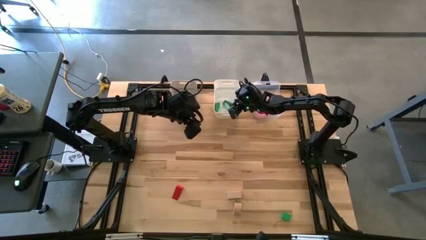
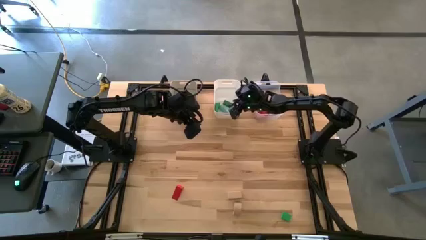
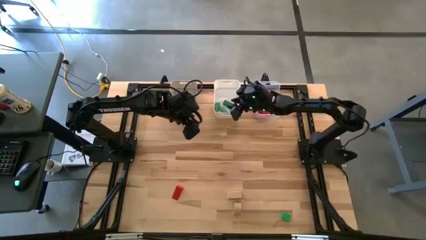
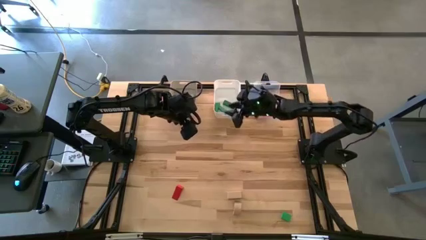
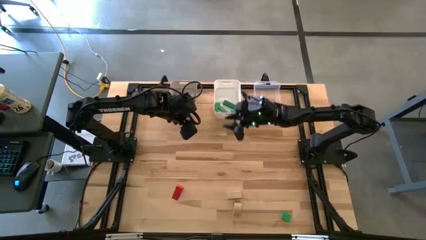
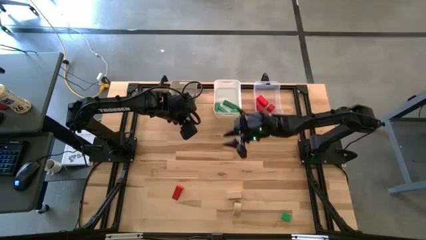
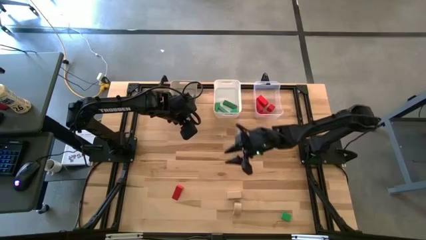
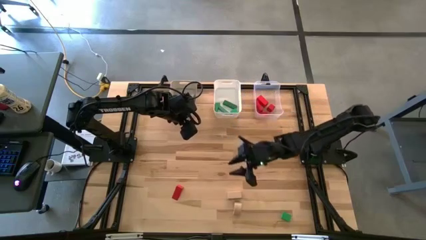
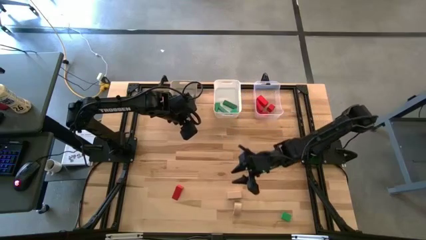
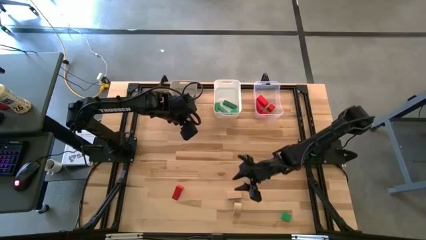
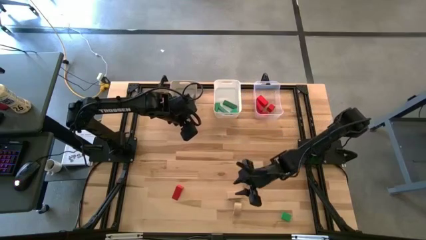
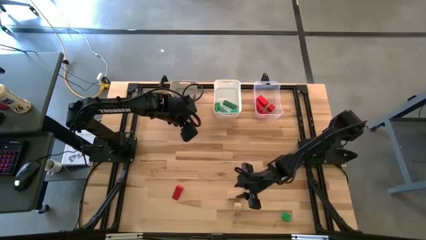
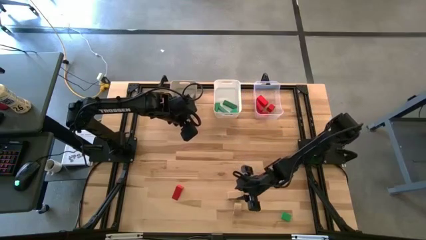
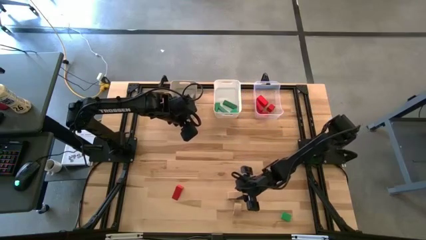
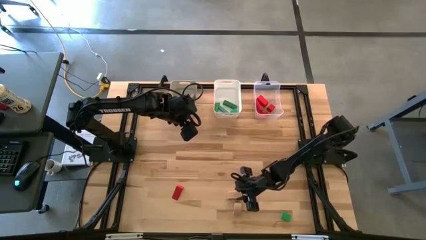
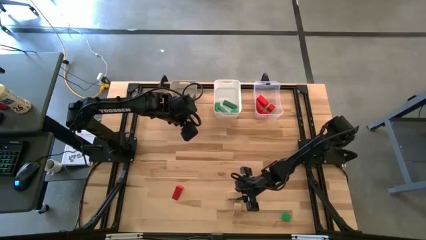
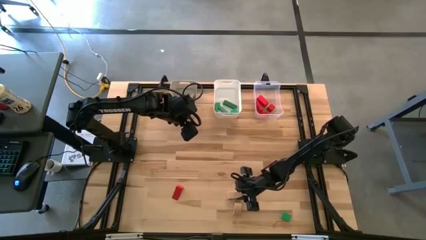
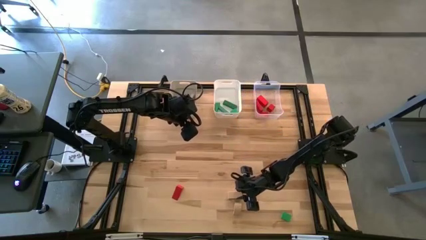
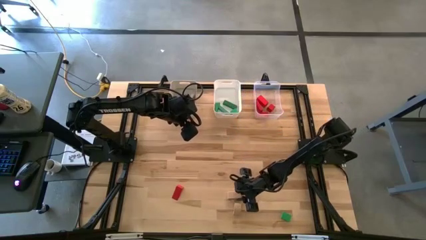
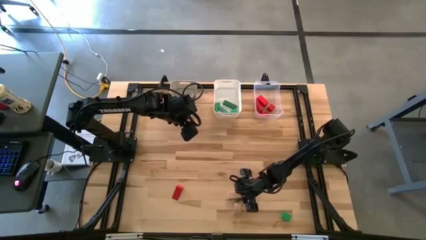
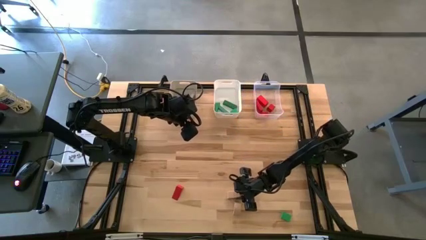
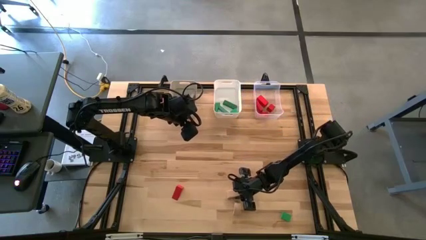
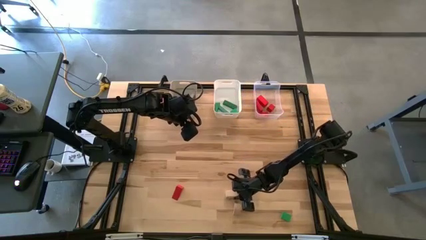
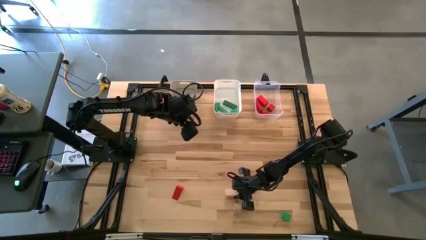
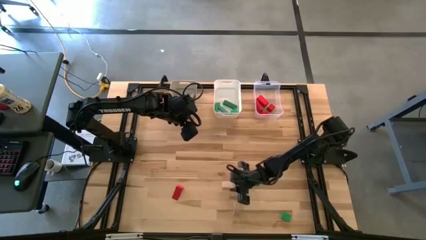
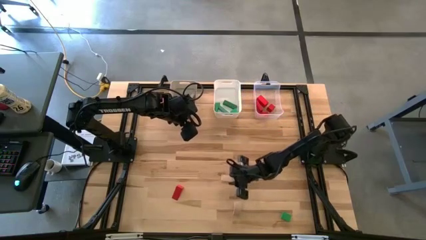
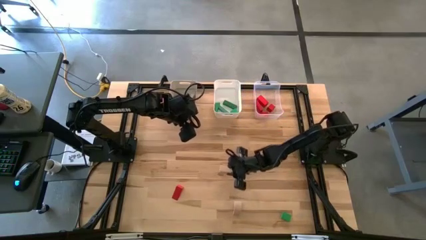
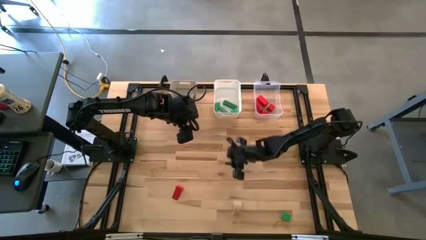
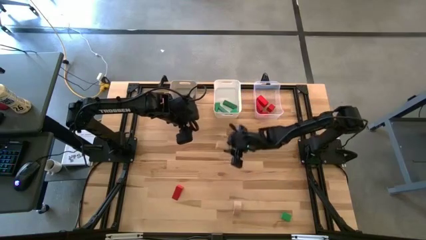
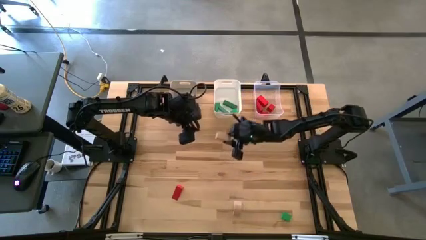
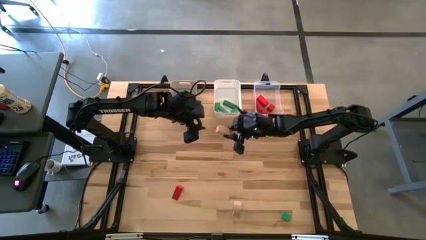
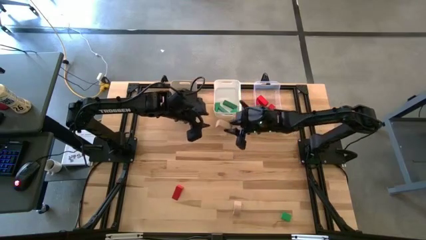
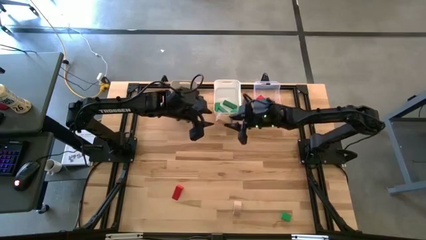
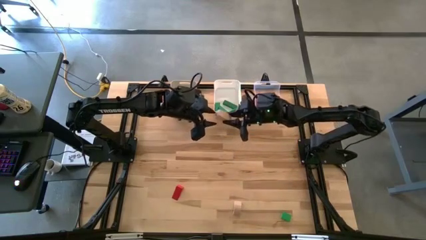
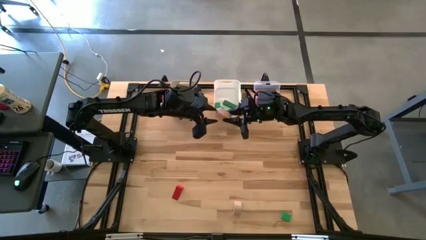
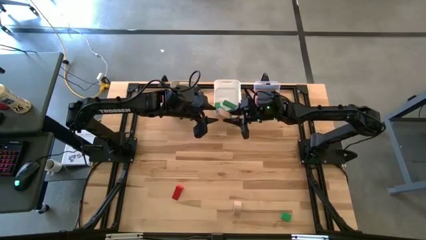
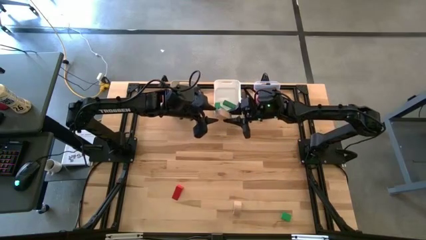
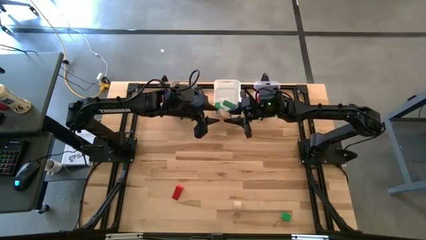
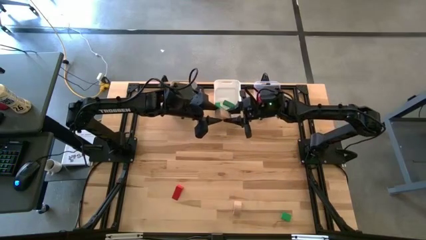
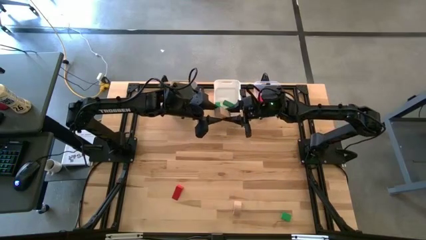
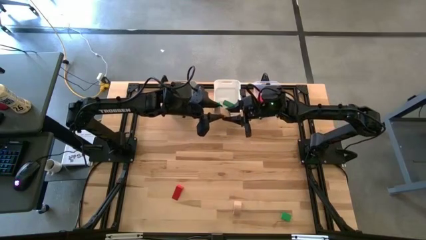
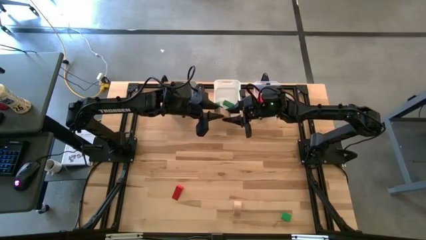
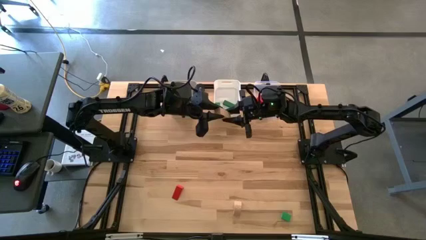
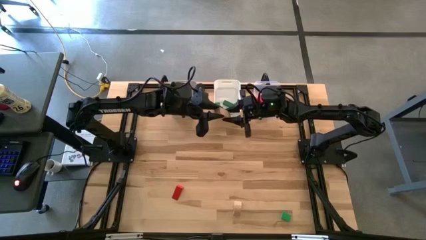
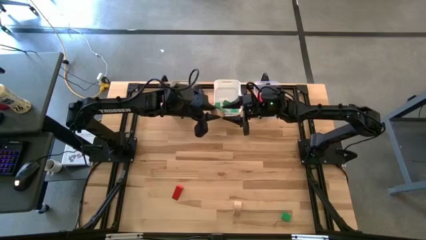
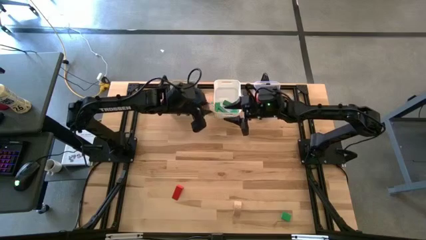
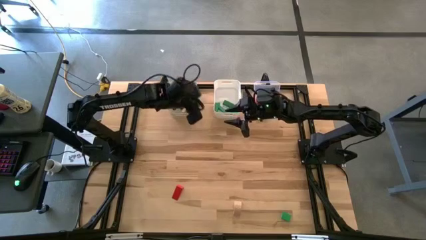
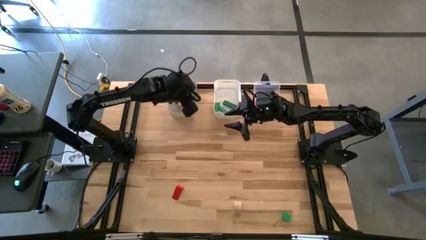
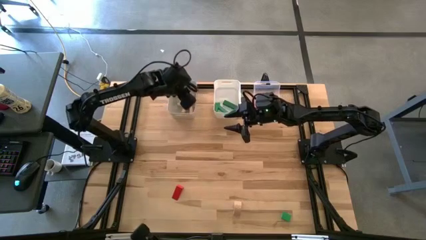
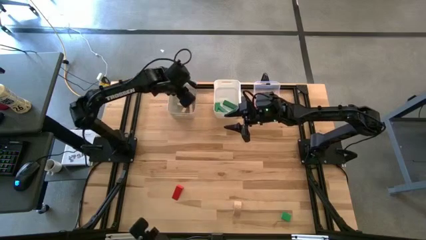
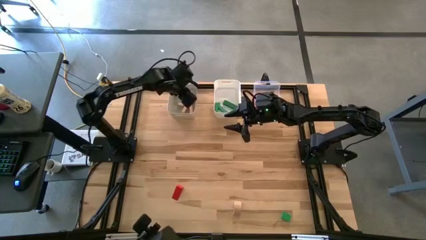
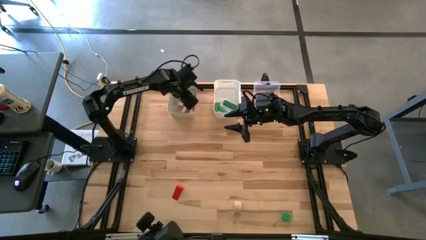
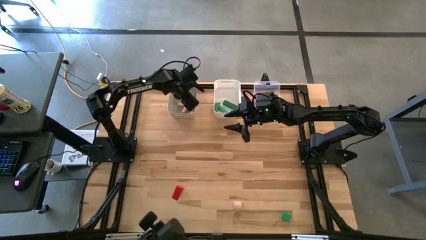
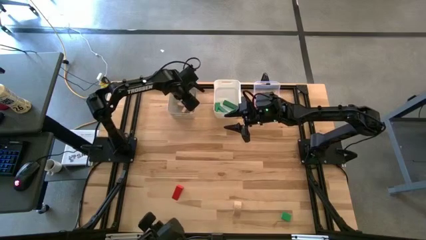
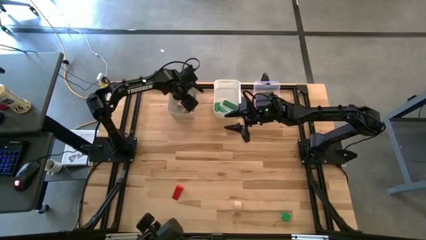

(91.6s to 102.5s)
Task: Sort & place blocks by color
Put the brown block into the gray bin

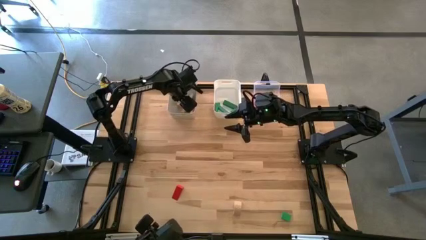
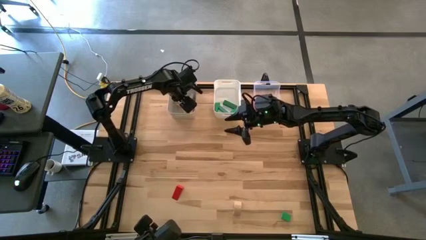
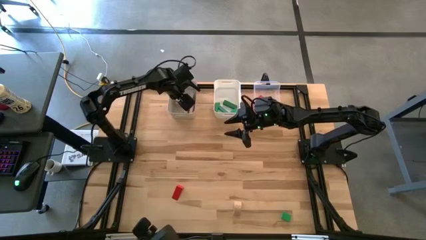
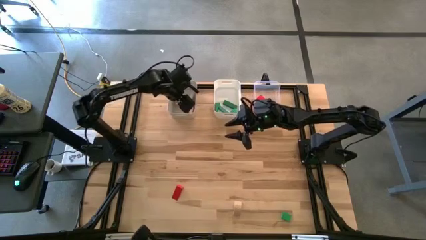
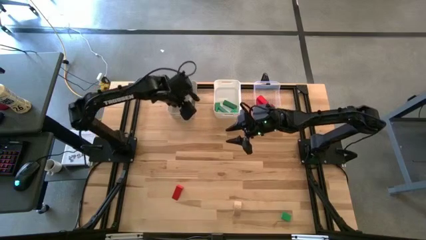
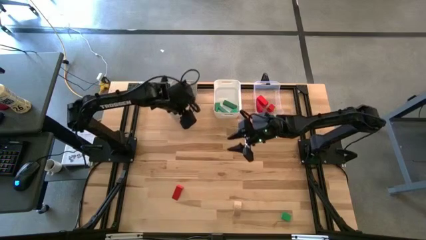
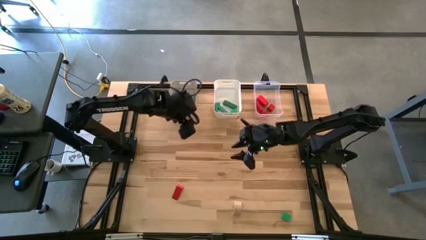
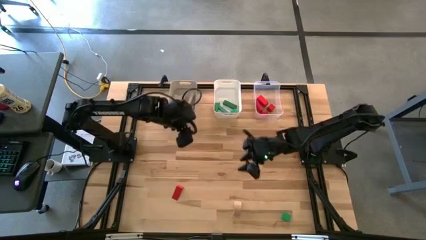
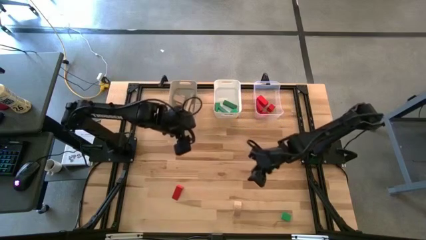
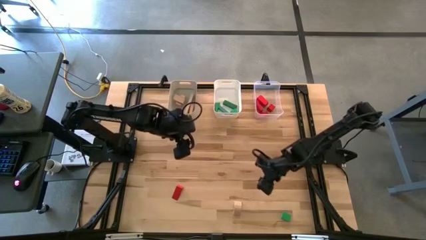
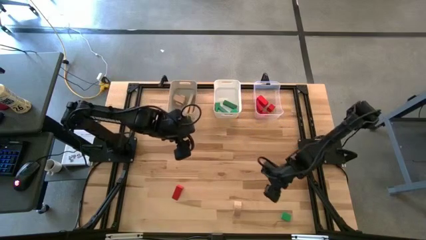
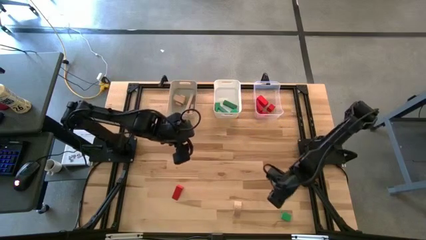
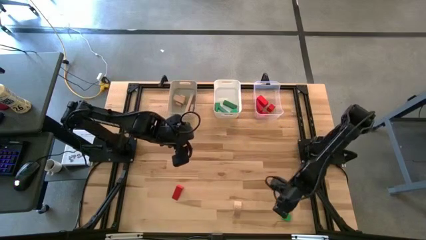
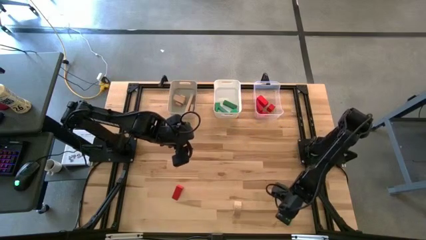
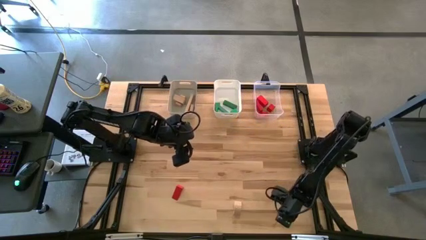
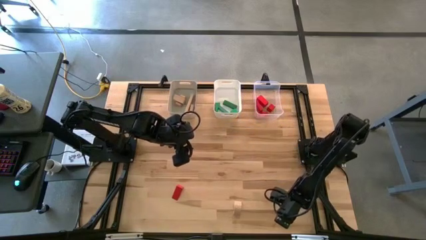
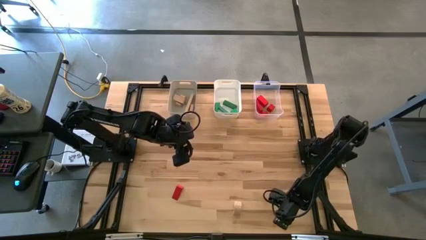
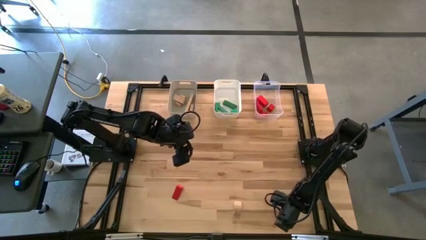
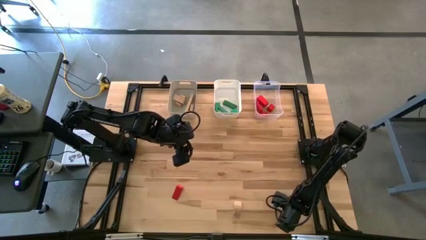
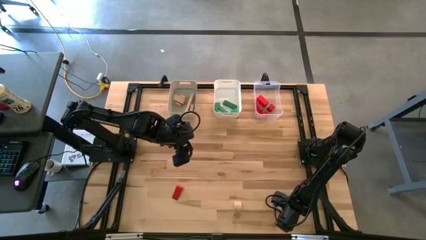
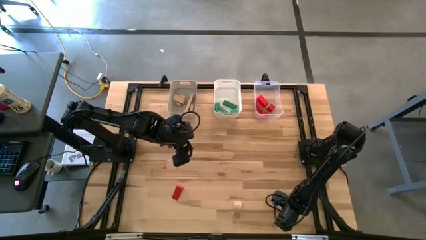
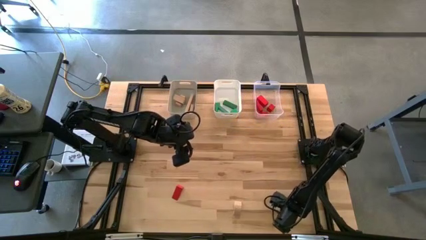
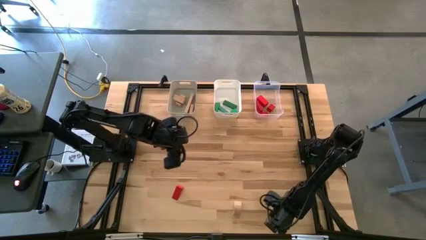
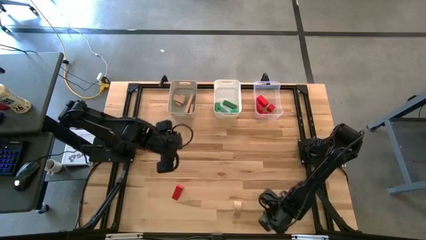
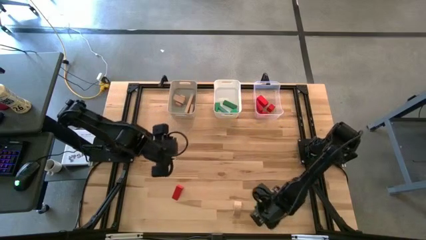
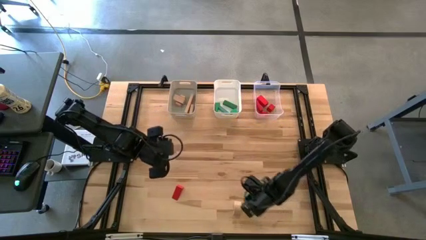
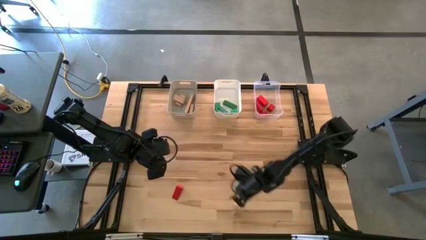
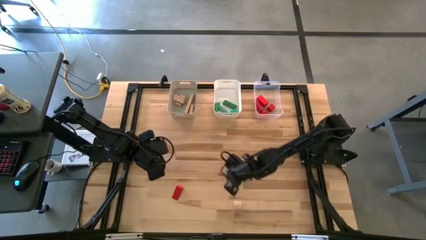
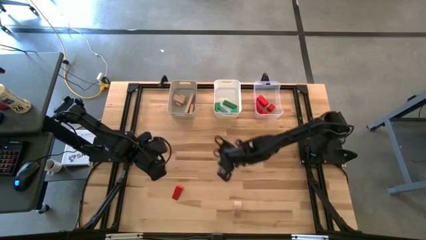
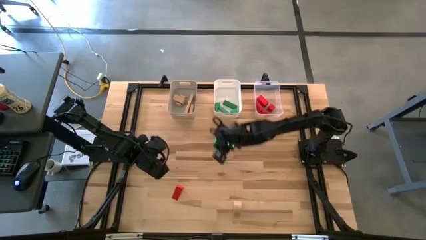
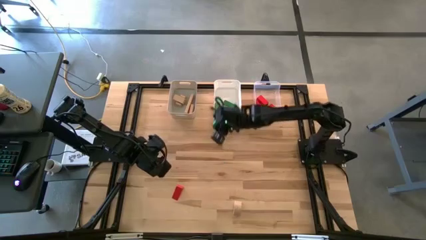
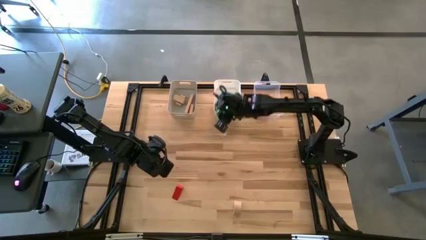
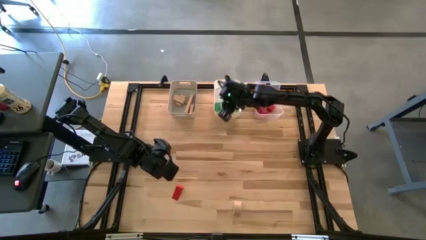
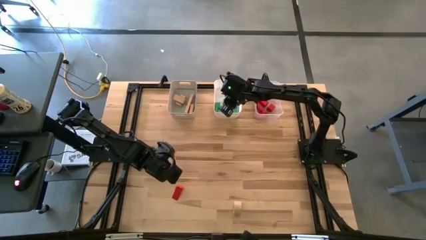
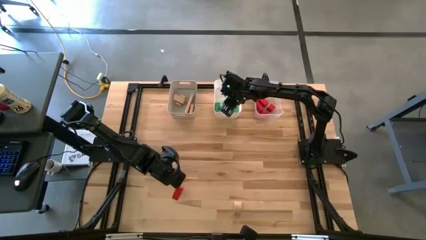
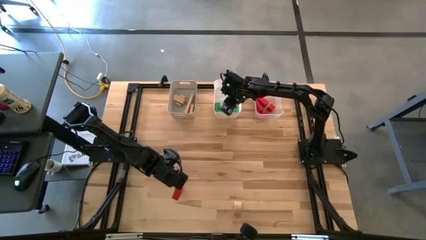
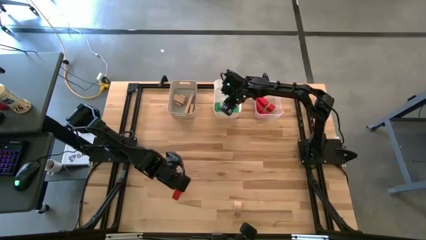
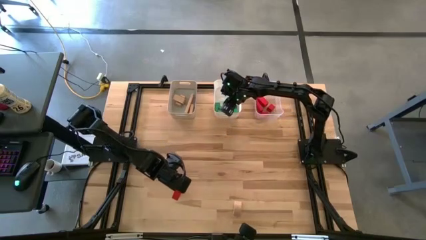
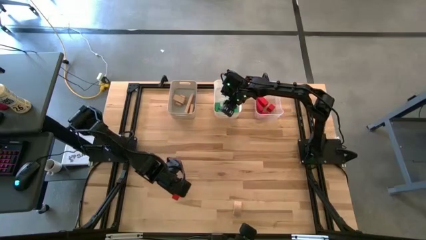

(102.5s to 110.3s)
Put the green block into the white bin
